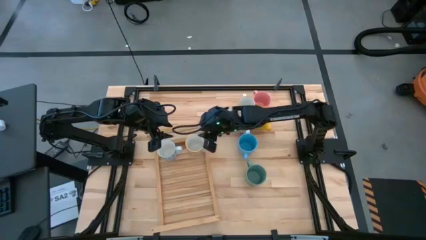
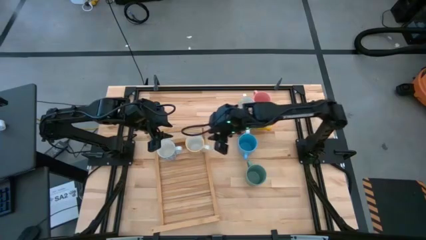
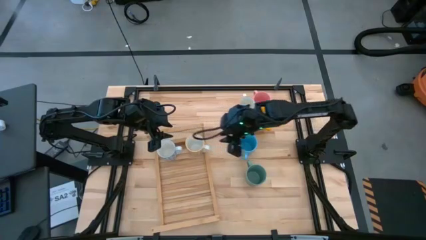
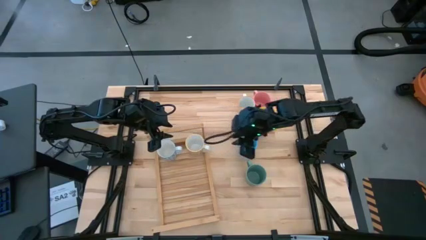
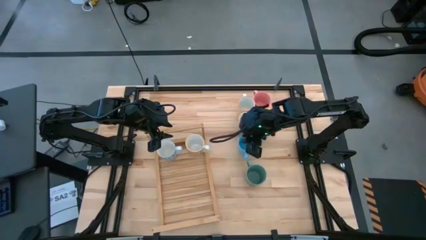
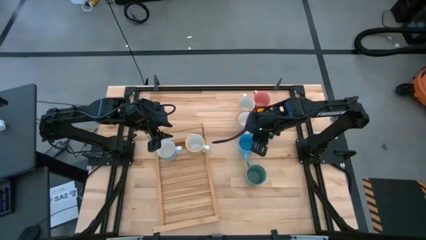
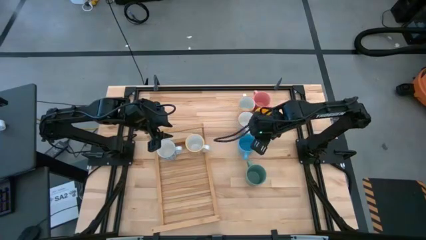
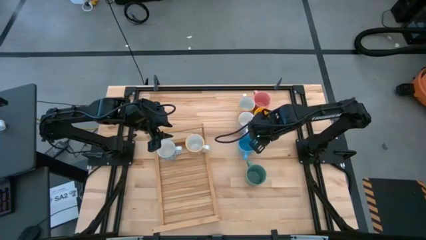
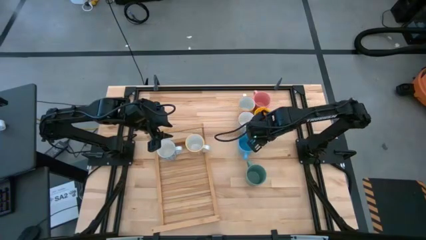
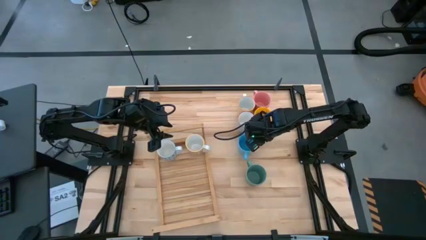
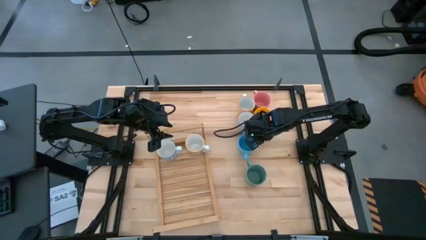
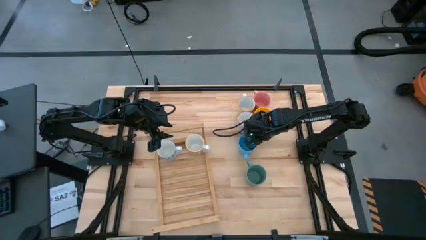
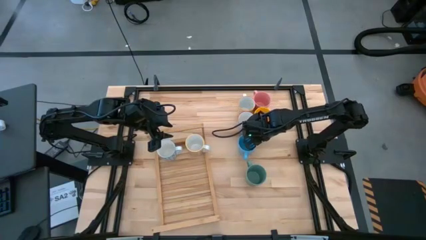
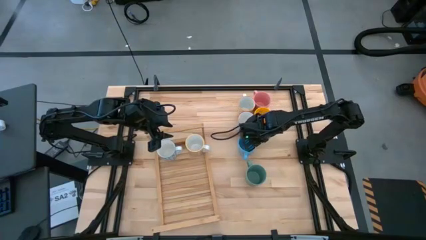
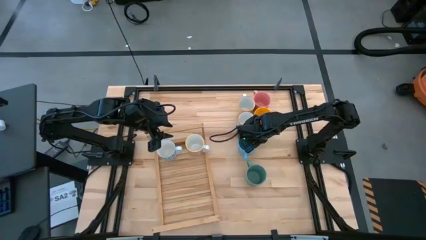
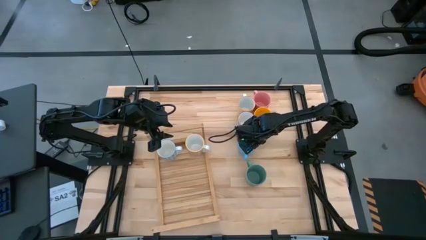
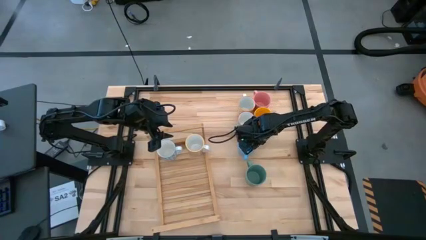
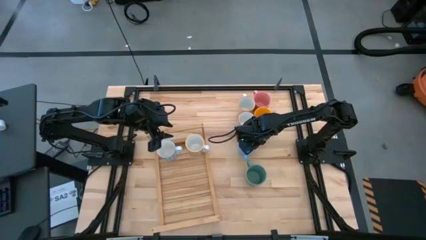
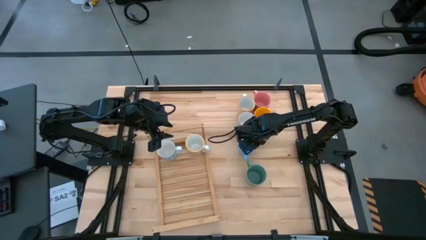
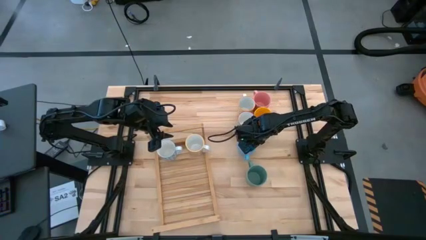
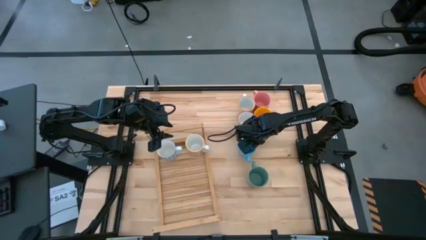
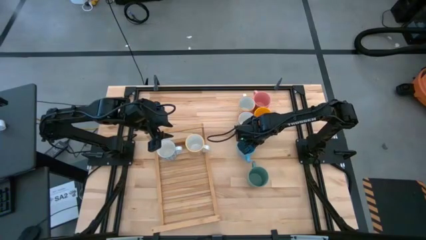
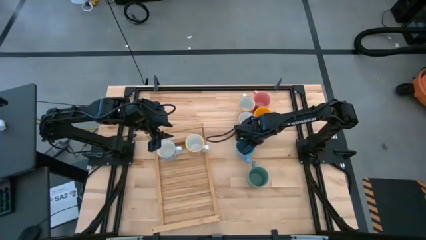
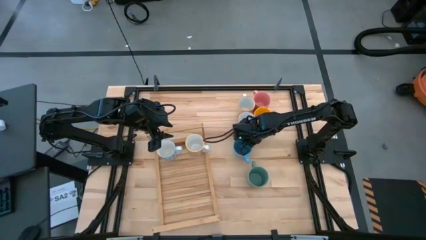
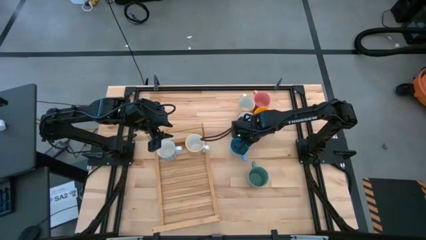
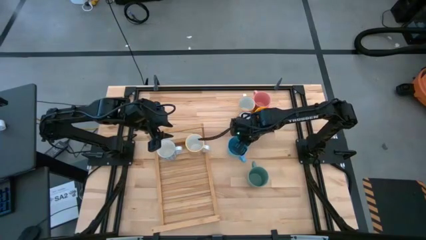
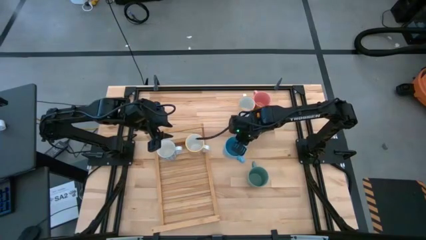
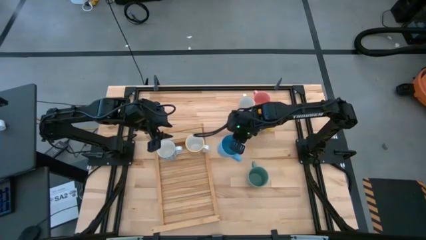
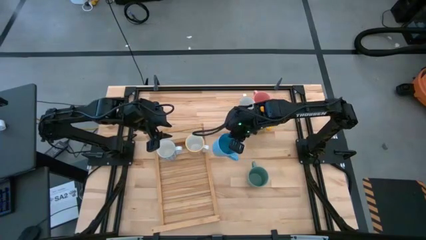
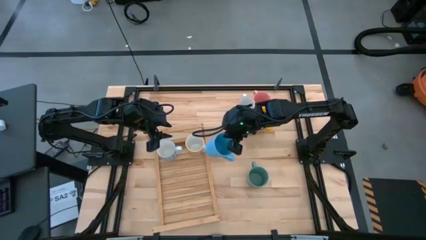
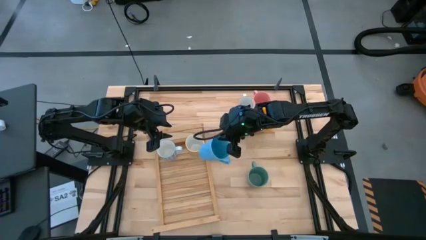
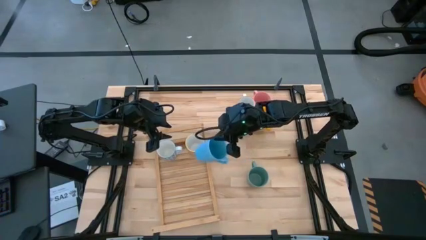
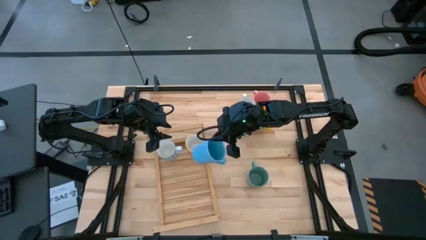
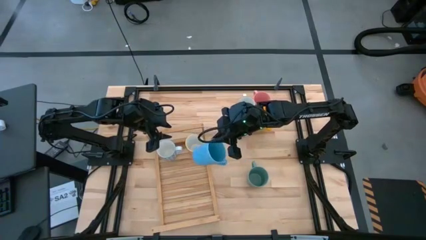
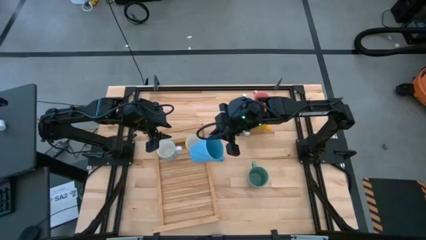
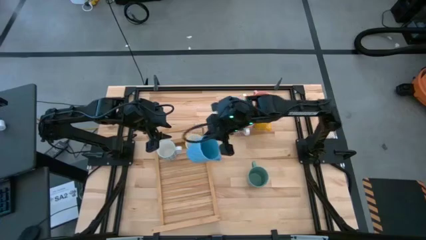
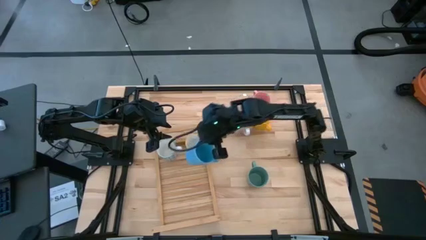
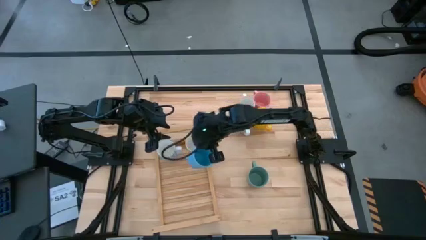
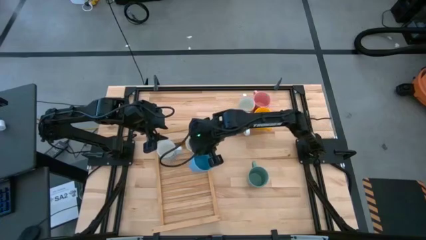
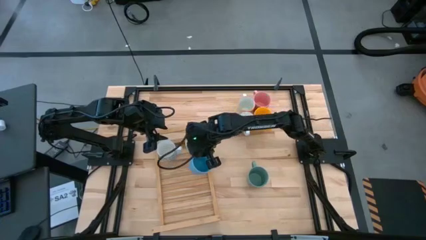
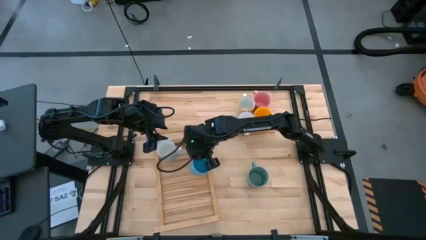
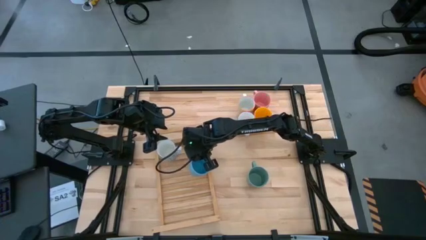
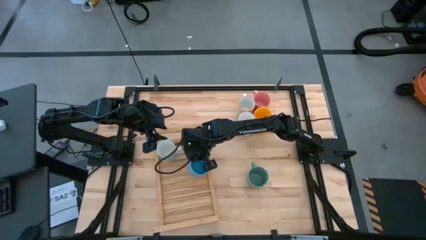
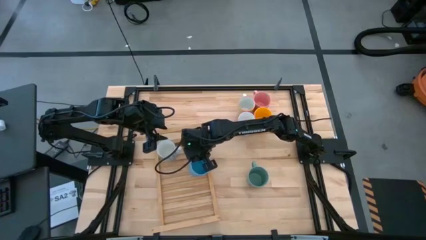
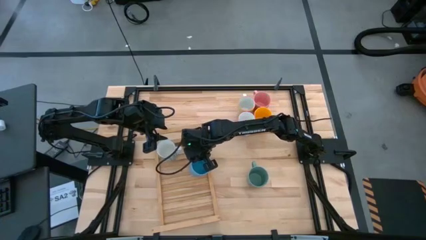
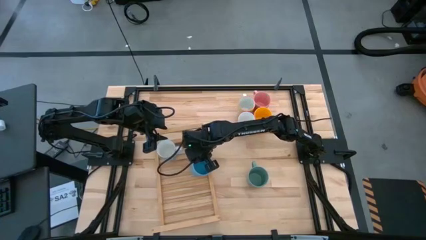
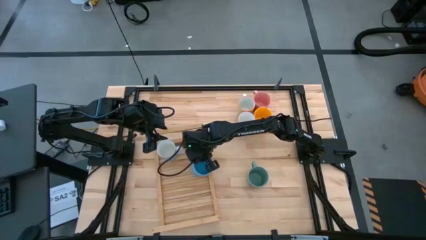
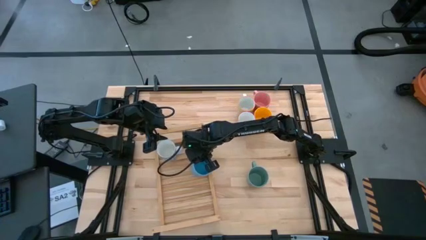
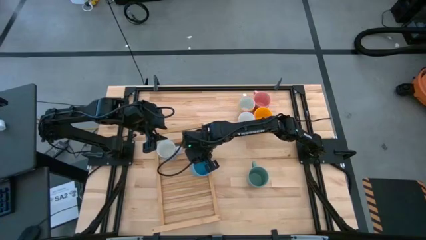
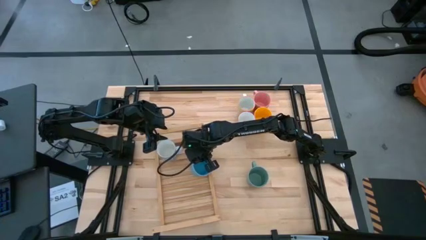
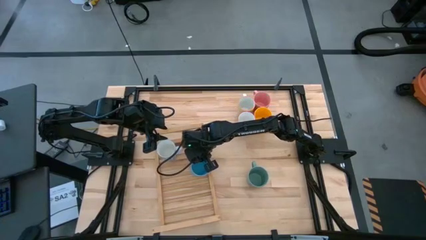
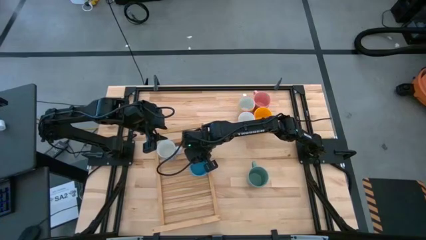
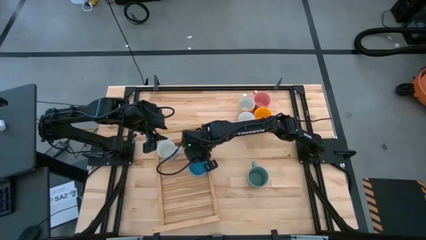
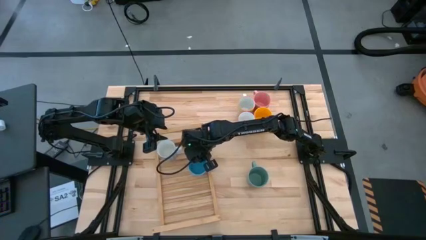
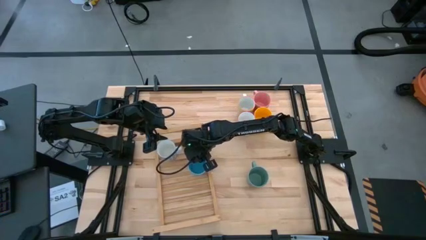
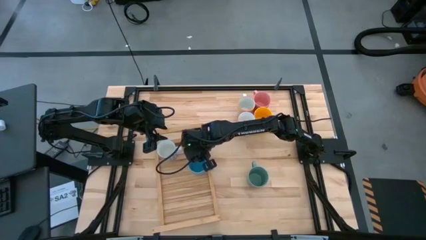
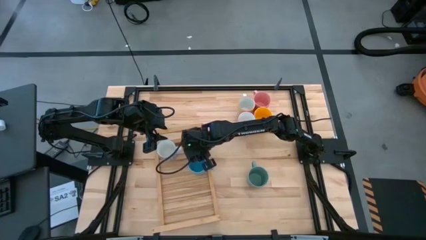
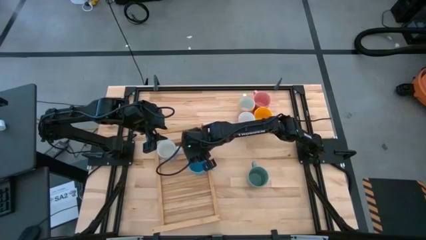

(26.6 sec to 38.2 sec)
Task: Place coffee mugs
Put the light blue mug on the shelf

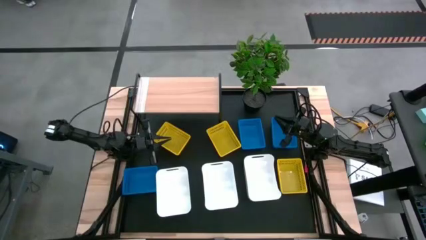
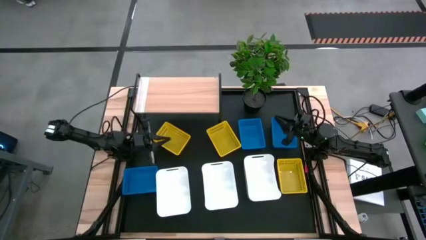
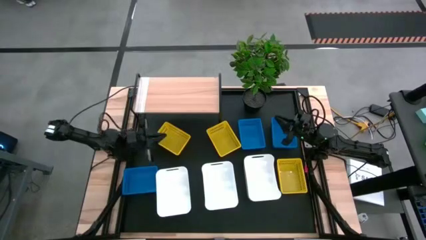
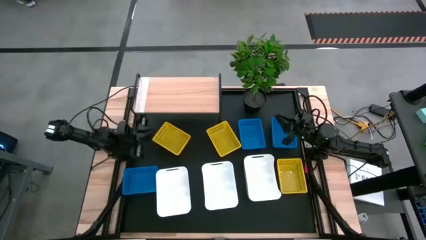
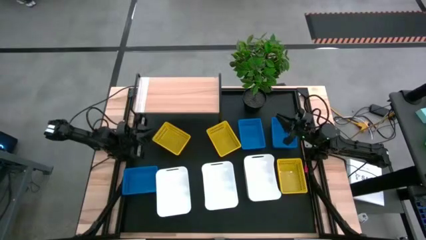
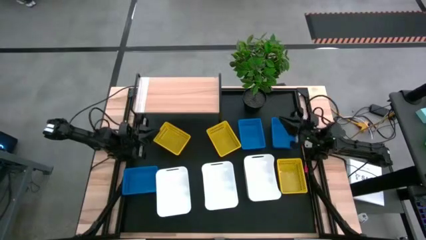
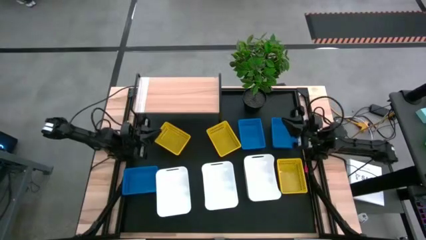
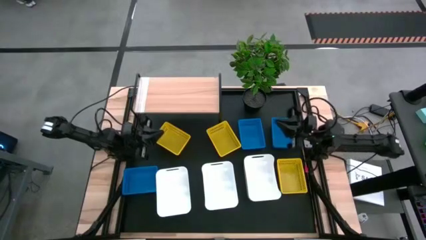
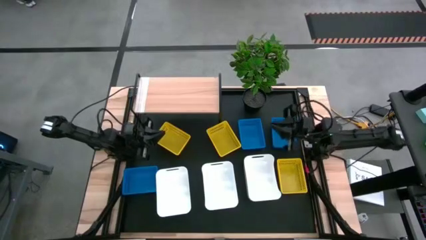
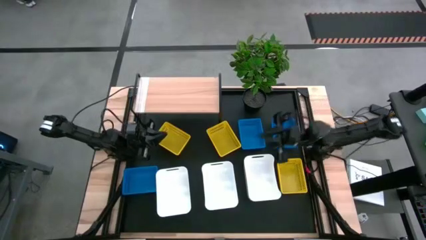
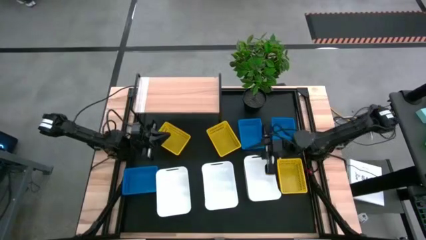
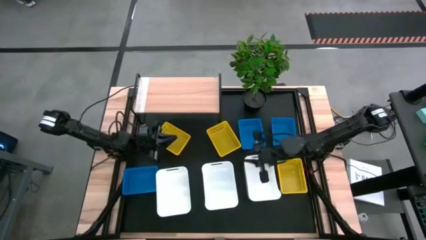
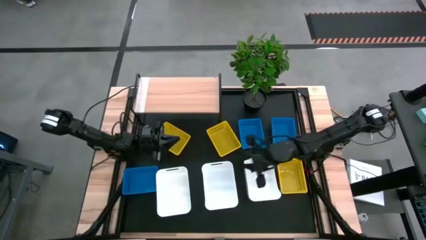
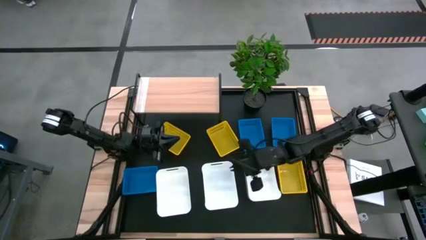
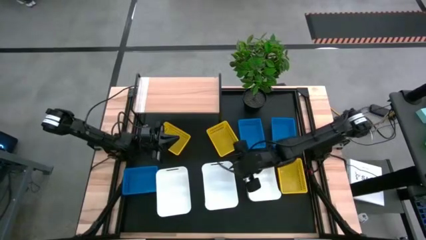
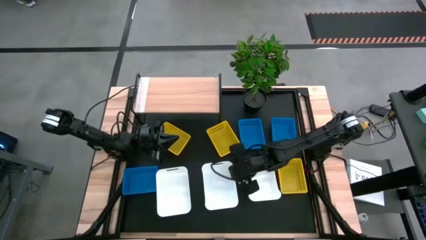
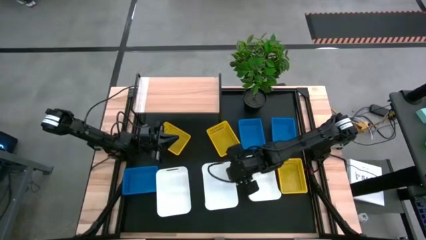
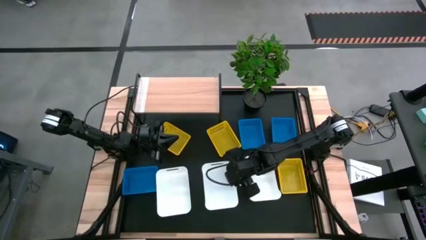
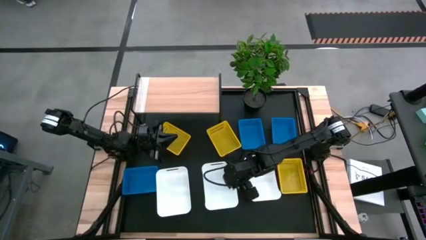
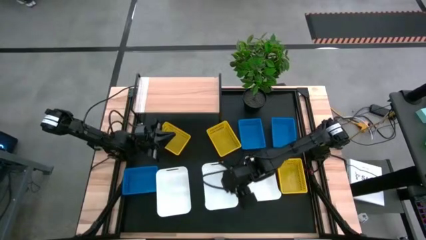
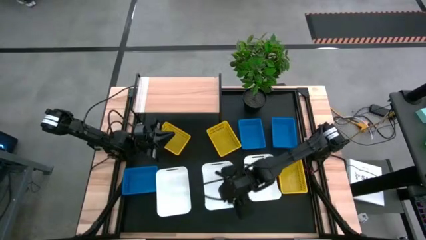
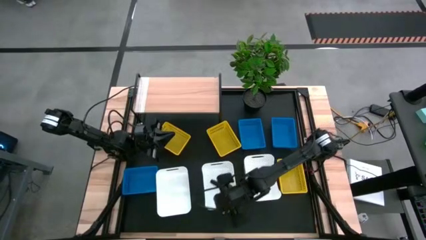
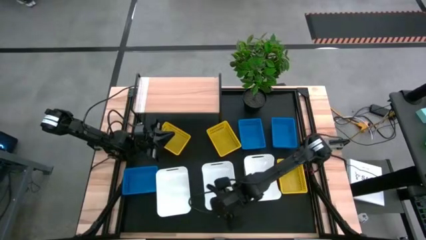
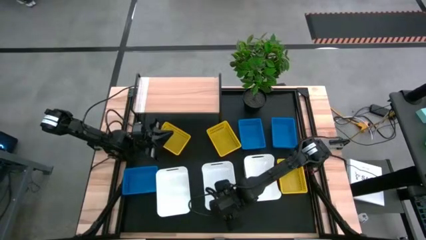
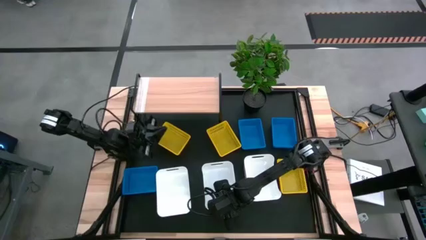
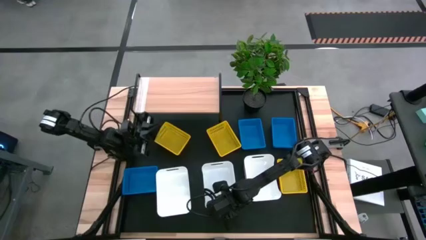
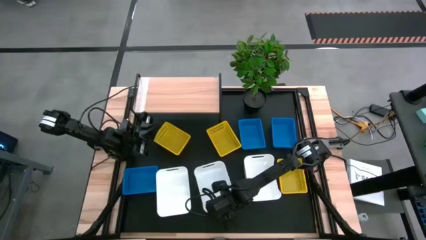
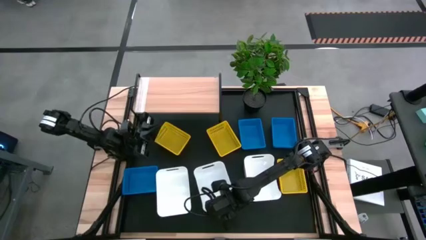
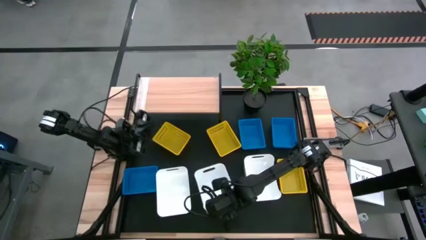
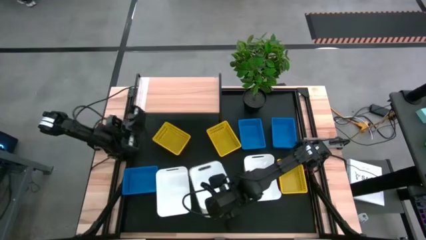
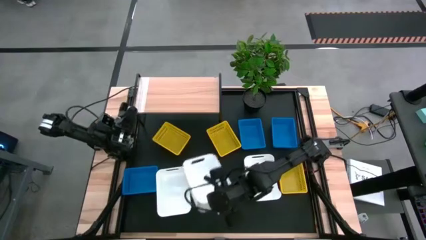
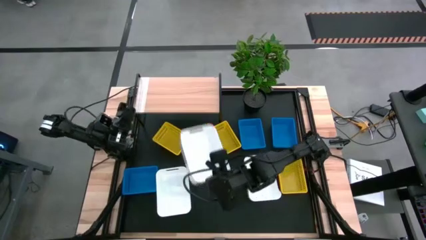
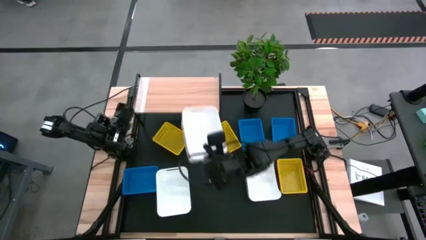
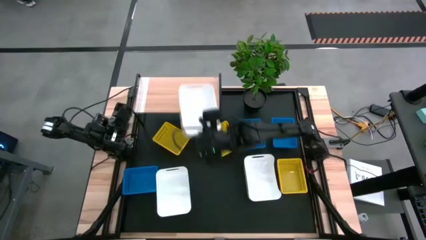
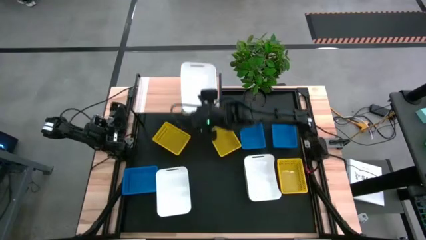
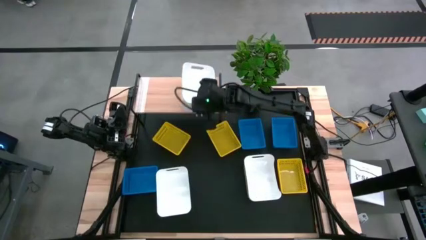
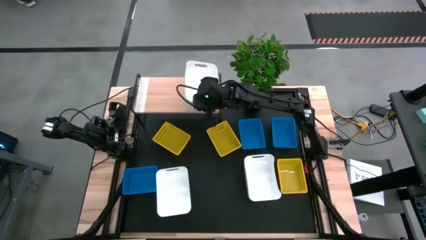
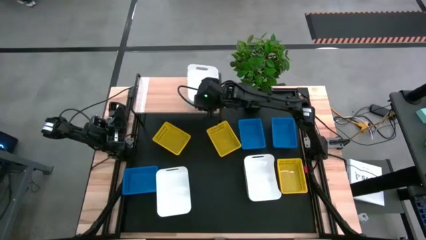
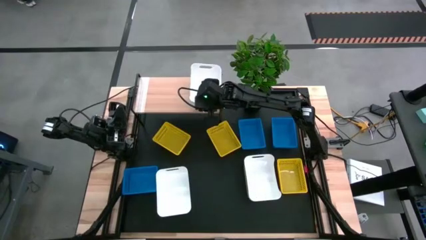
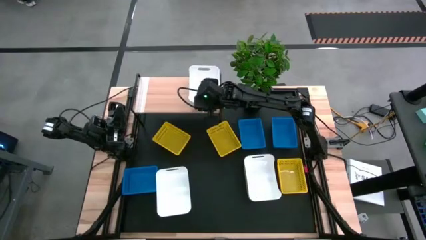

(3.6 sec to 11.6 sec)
Task: Stack baskets on shelf by color
Put the center white bin on the shelf
